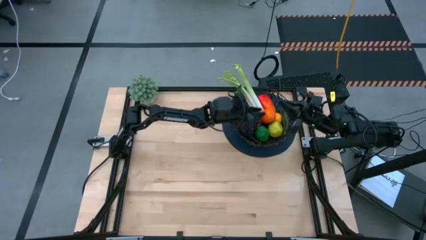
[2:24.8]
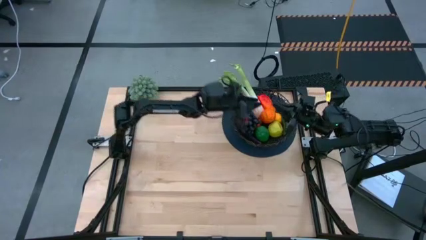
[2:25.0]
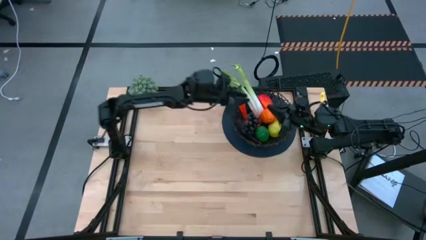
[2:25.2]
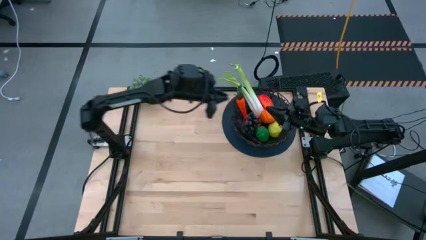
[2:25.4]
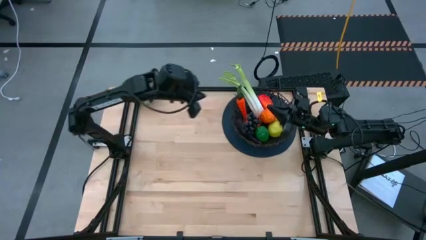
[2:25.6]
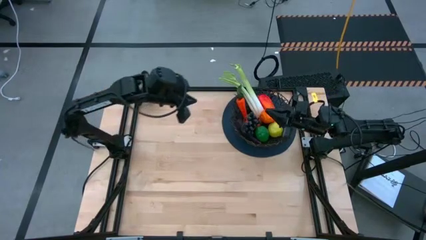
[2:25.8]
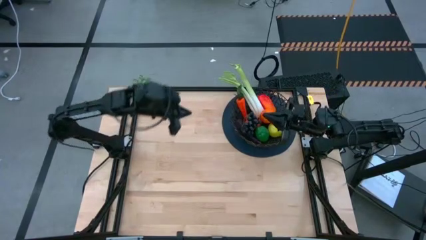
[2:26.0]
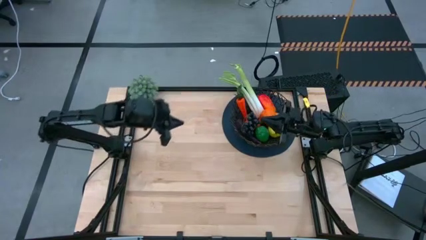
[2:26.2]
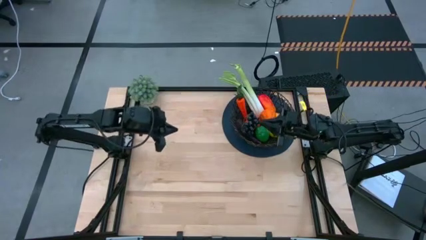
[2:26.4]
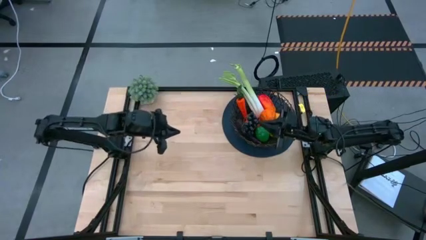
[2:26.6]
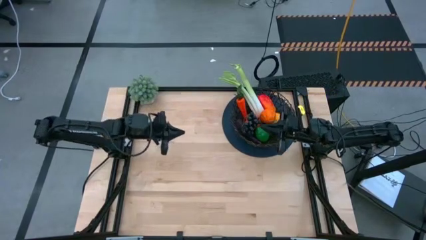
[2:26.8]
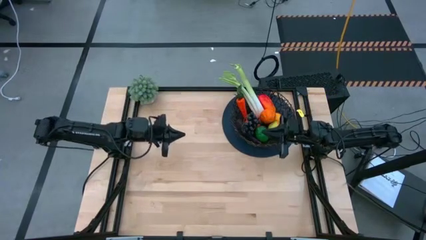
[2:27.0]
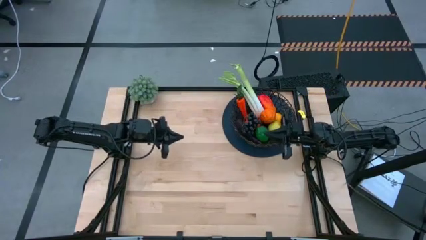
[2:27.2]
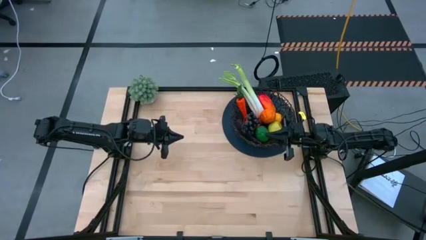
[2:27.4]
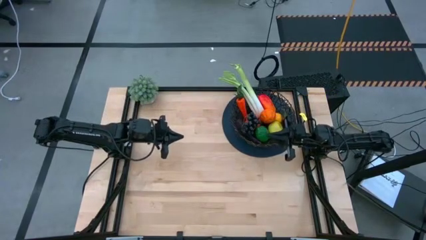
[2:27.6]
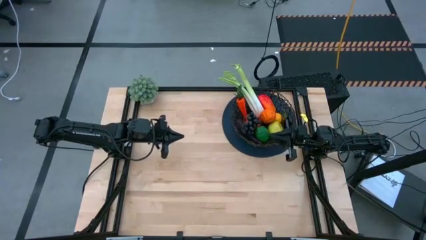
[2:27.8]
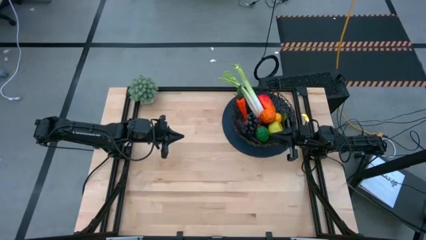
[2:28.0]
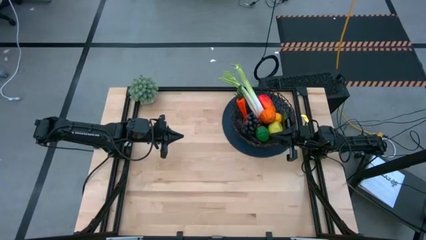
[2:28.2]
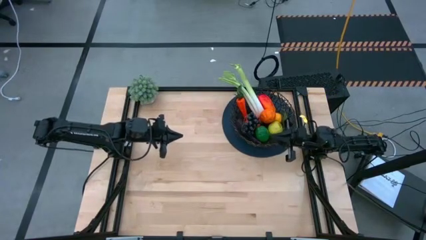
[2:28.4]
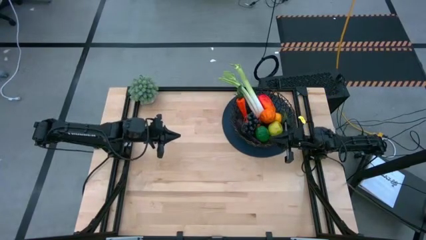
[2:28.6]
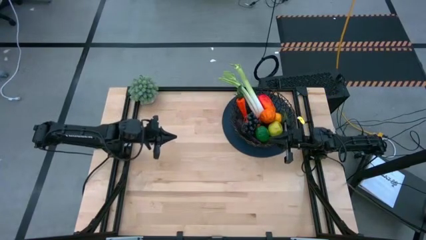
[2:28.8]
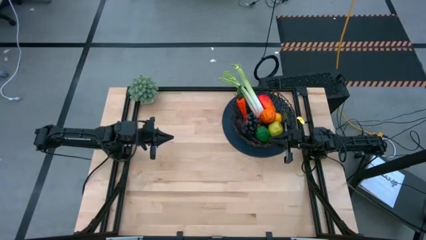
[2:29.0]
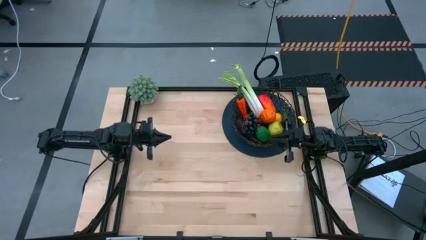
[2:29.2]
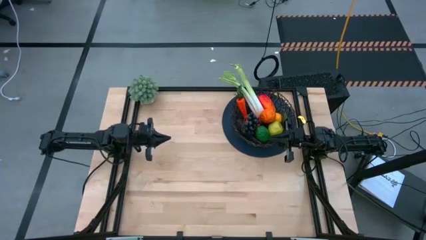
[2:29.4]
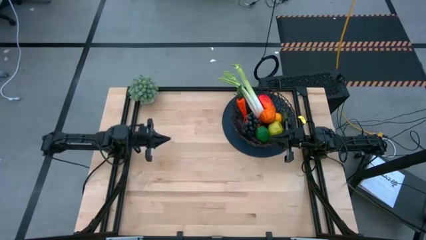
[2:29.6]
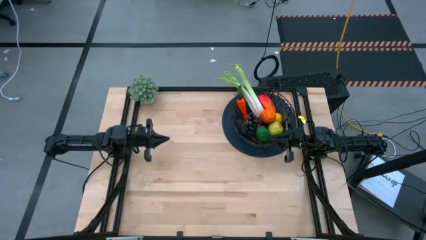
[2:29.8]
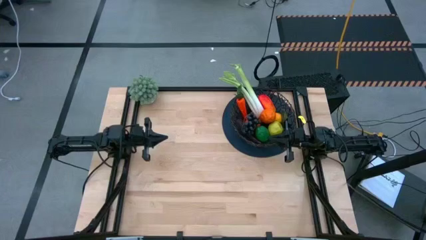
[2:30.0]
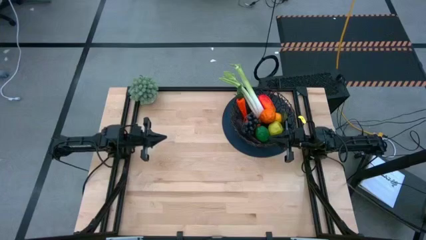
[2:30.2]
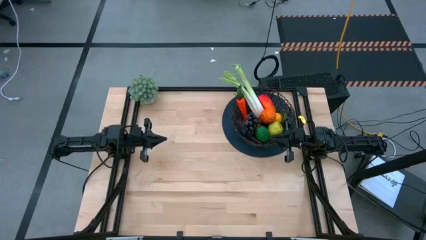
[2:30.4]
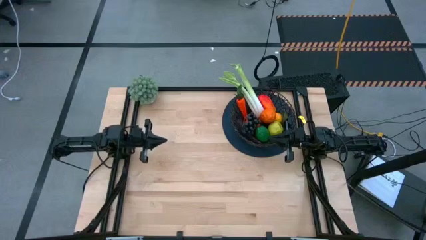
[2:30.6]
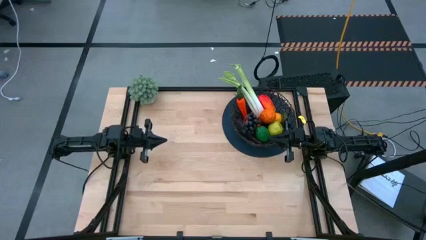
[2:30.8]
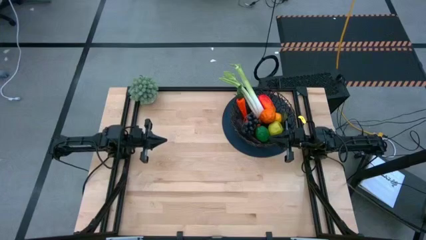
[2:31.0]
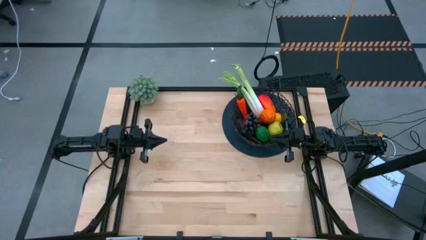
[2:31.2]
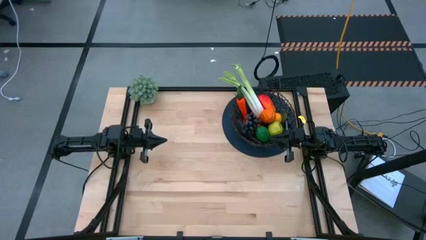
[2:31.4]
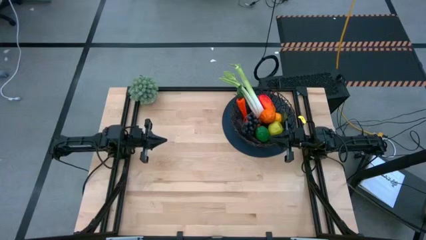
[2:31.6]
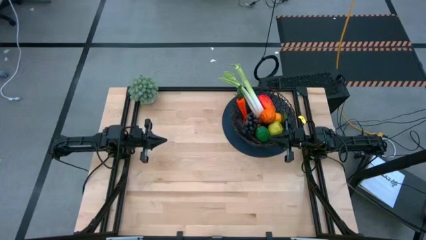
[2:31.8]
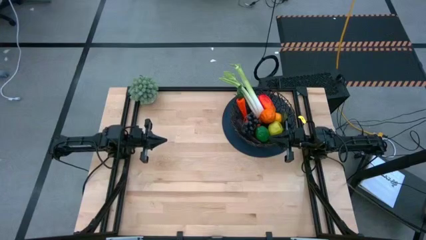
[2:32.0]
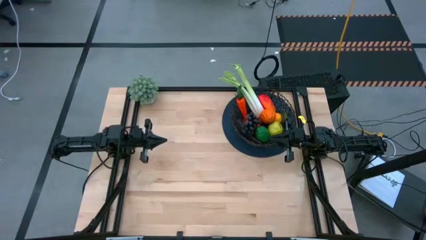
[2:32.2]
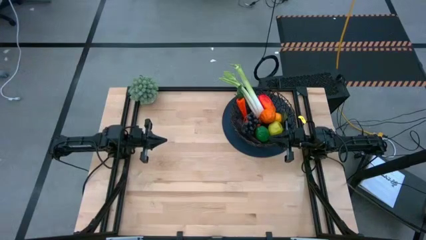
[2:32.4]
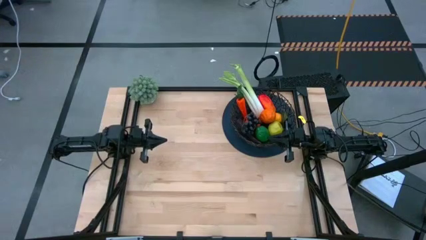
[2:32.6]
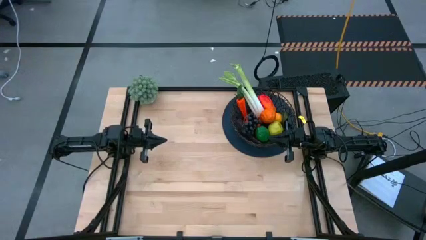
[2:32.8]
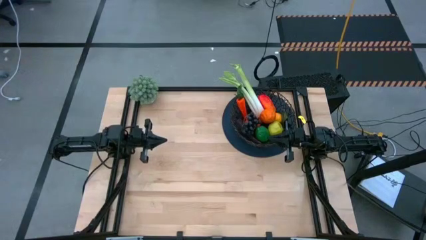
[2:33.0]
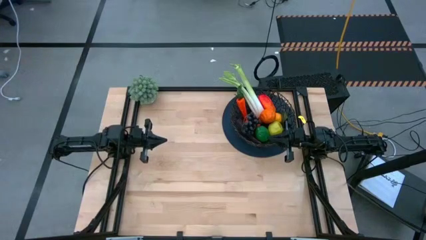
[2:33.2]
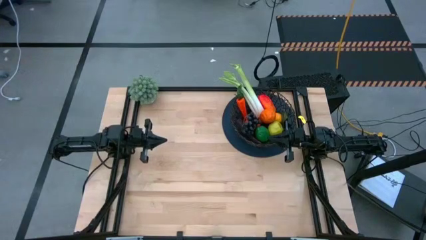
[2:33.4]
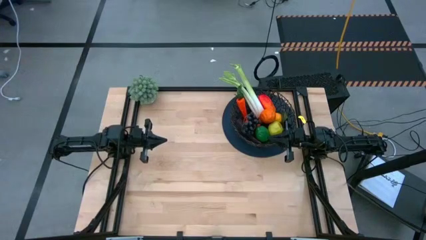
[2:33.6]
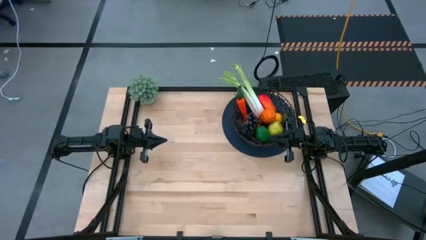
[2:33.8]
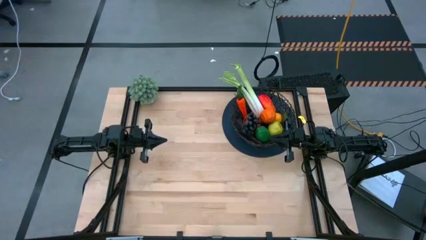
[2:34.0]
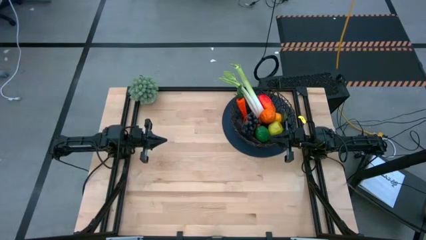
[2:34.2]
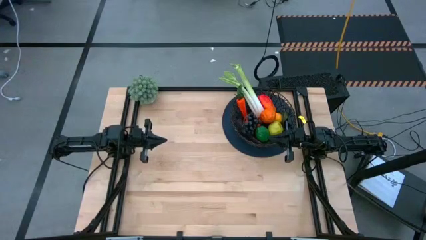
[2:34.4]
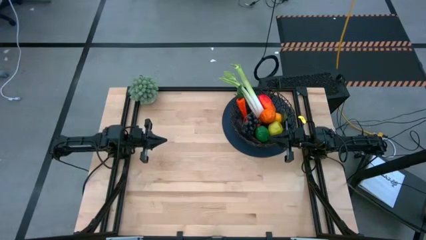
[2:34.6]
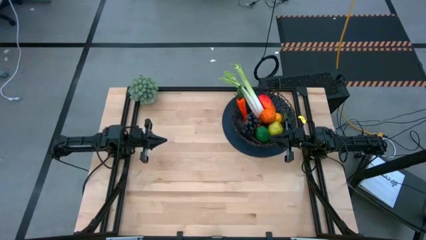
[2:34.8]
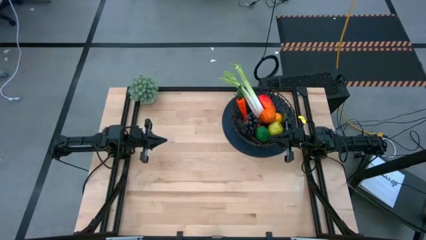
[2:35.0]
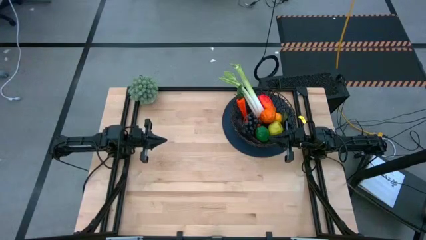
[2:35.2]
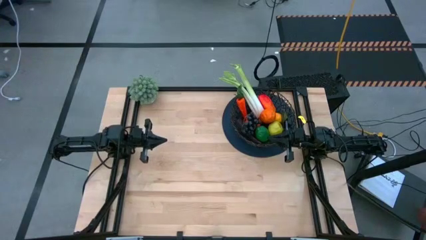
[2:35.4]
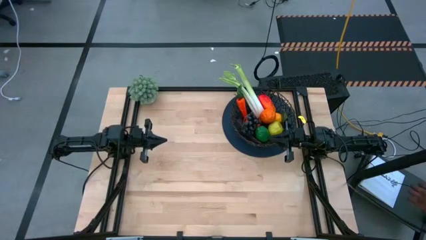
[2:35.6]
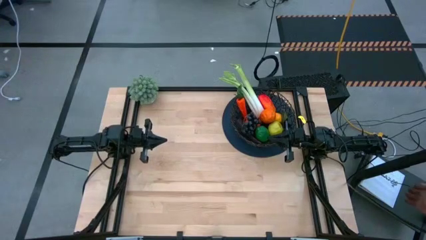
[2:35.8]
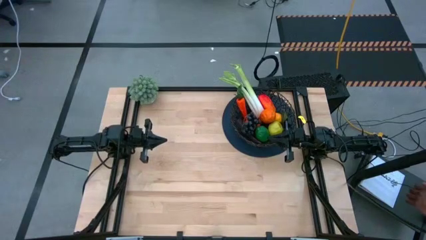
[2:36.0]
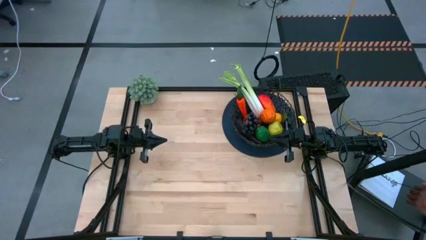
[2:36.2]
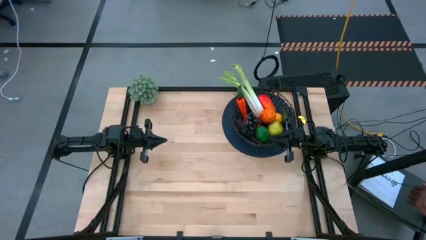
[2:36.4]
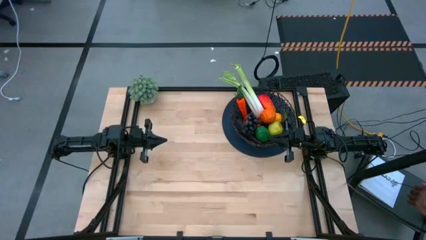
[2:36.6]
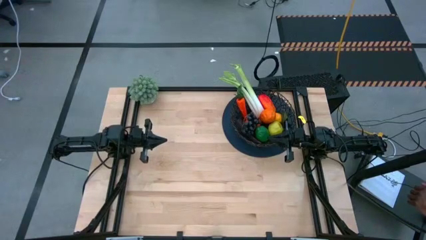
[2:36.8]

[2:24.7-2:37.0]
Task: Build produce basket
Return to Home Position
